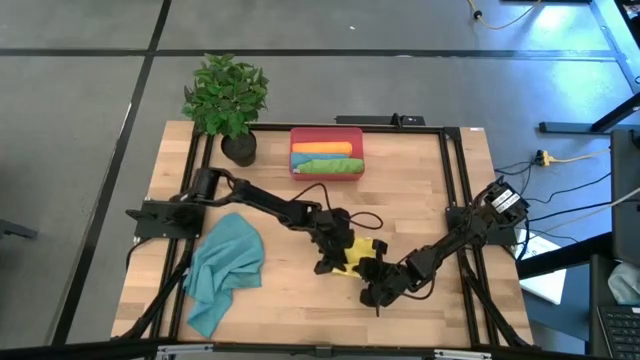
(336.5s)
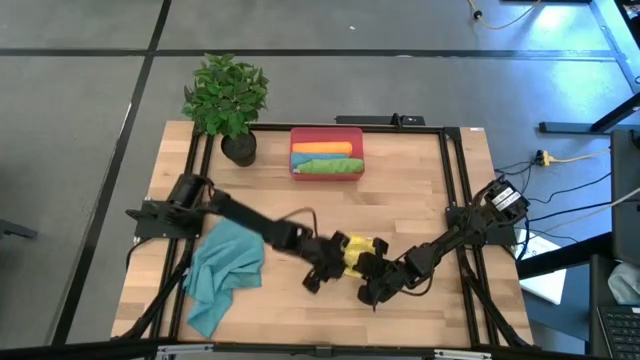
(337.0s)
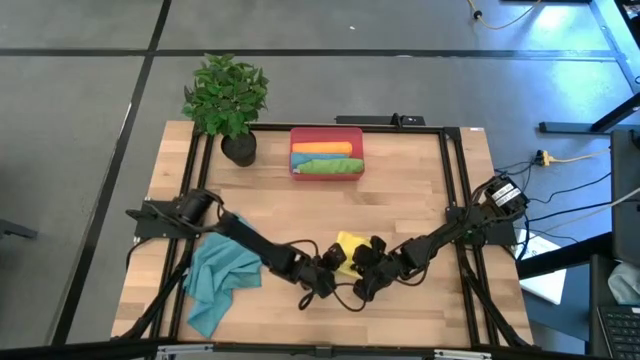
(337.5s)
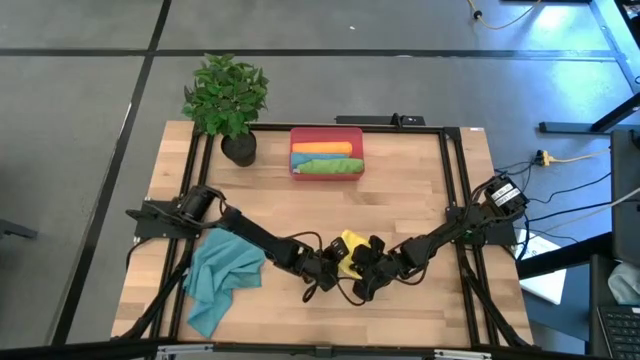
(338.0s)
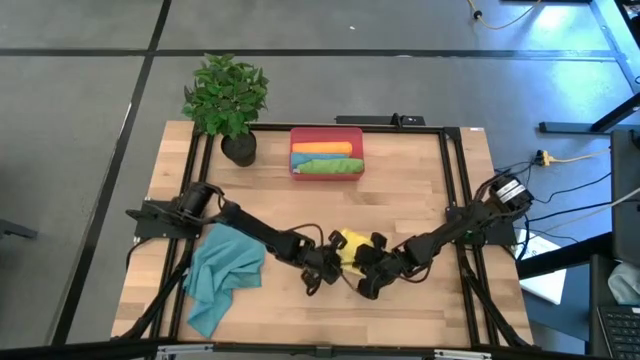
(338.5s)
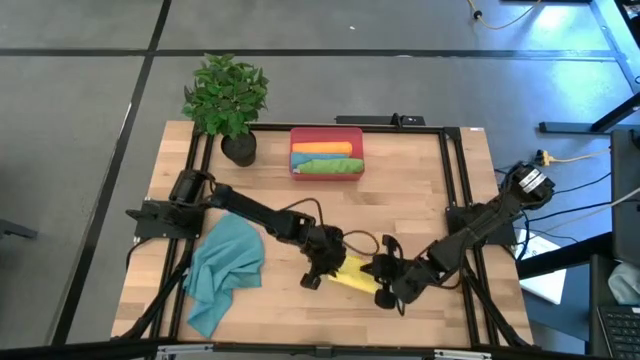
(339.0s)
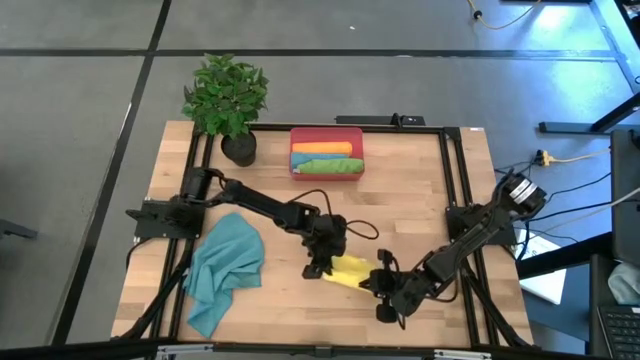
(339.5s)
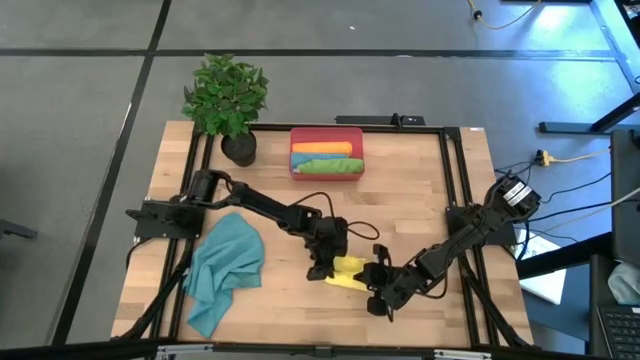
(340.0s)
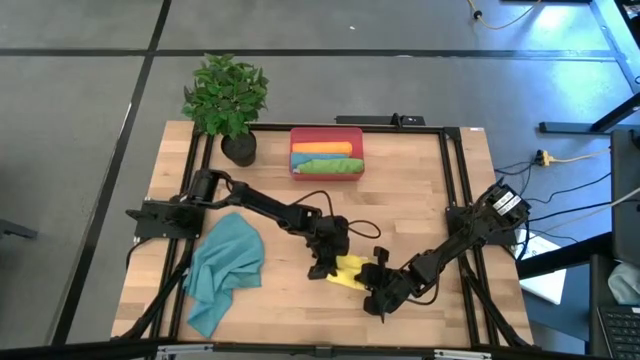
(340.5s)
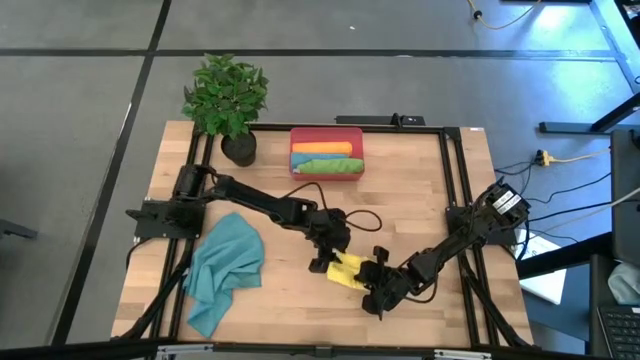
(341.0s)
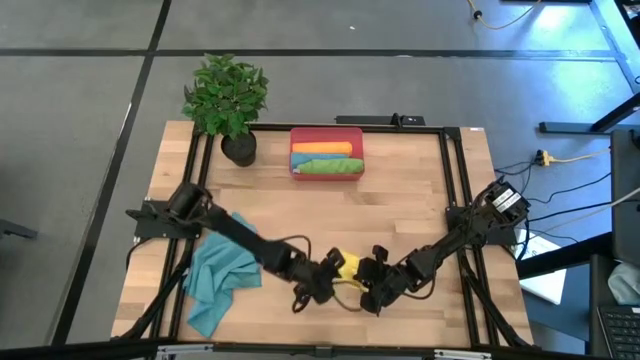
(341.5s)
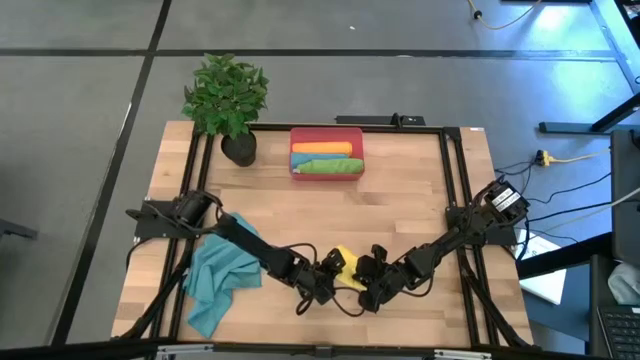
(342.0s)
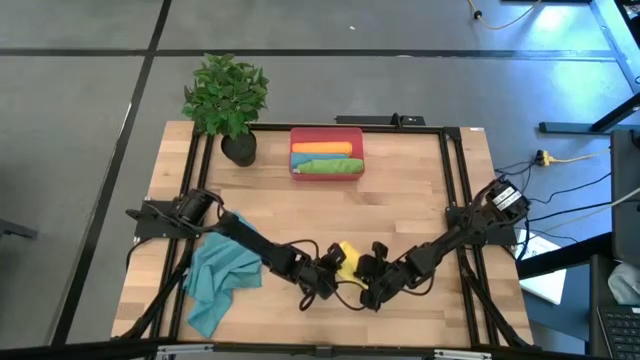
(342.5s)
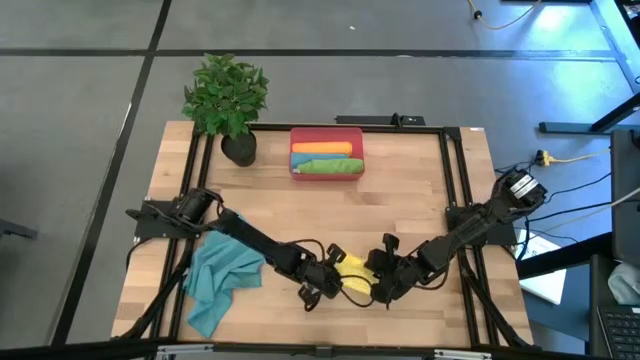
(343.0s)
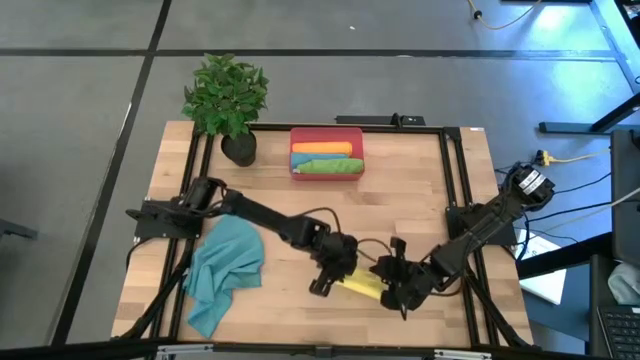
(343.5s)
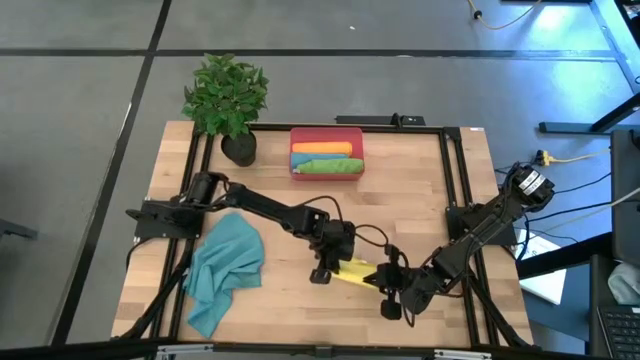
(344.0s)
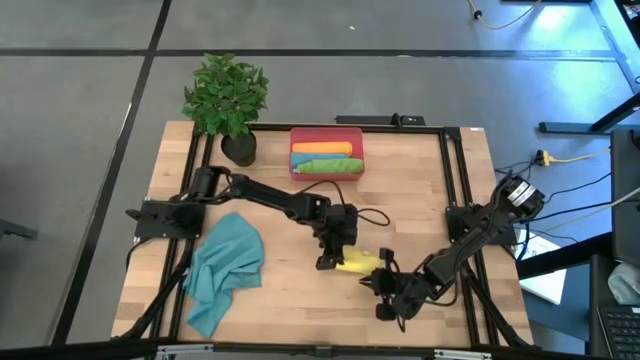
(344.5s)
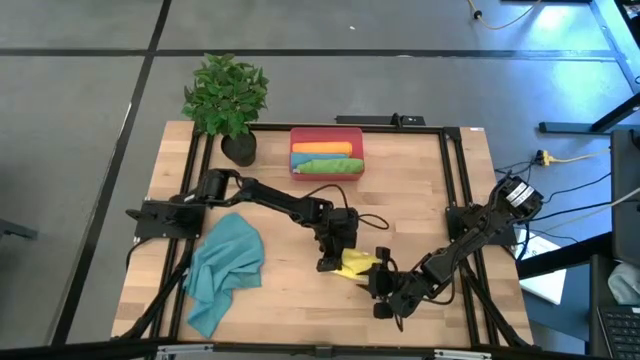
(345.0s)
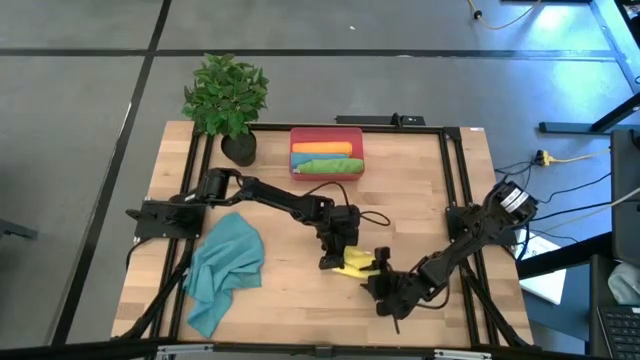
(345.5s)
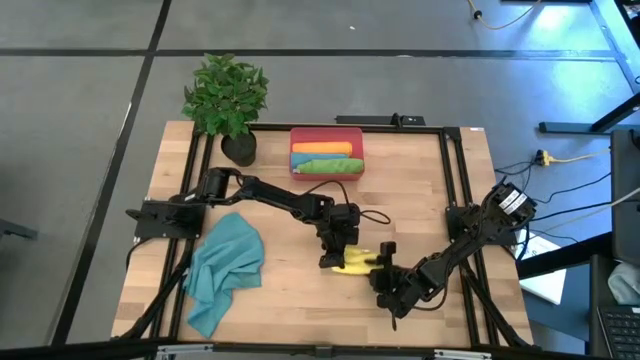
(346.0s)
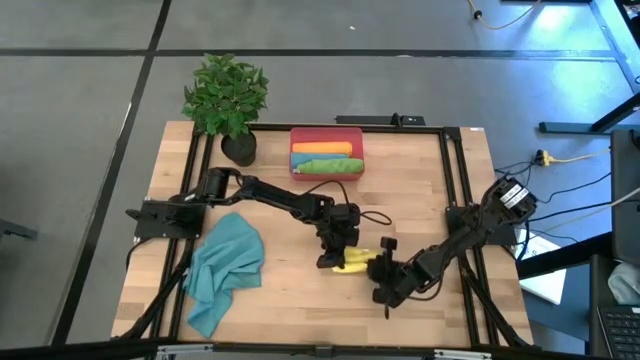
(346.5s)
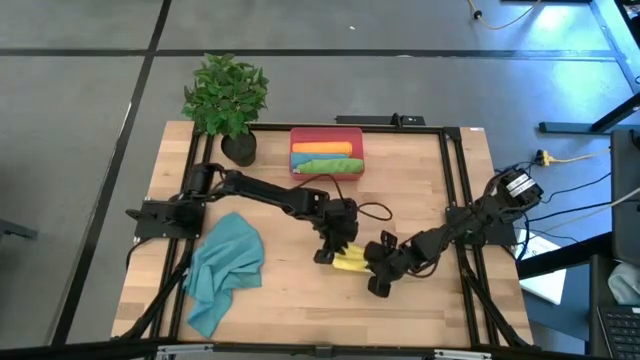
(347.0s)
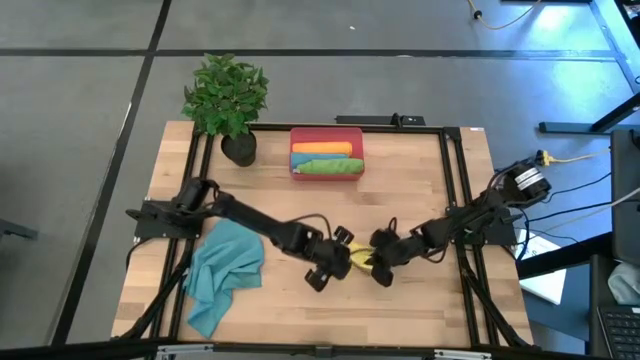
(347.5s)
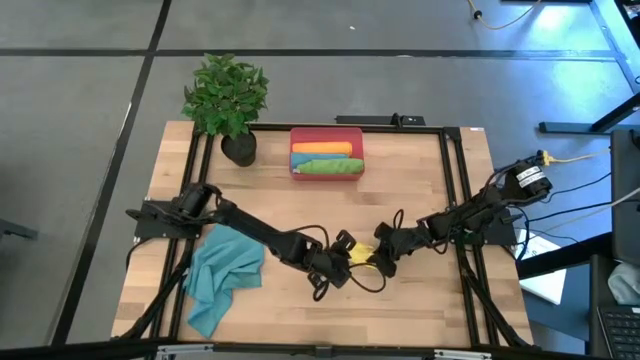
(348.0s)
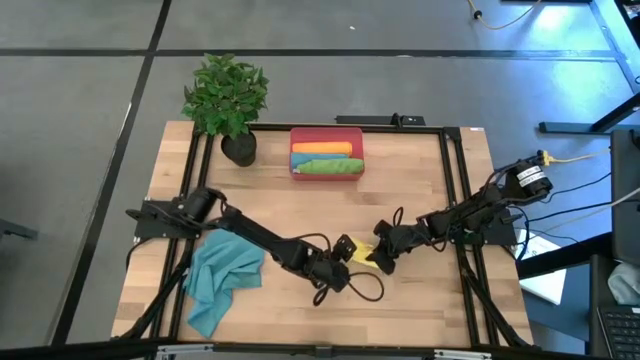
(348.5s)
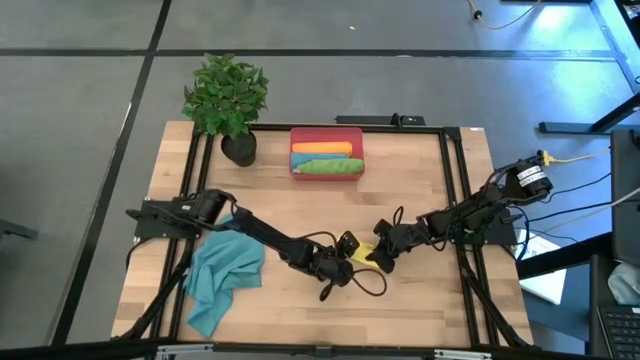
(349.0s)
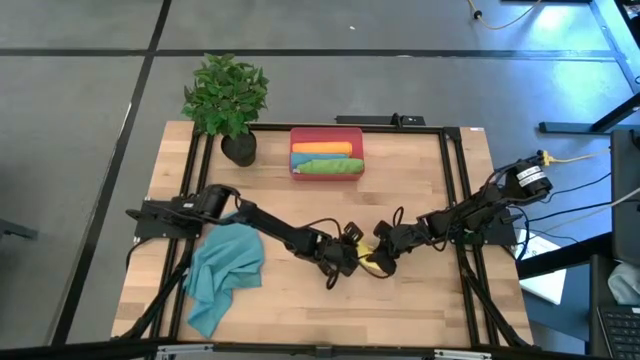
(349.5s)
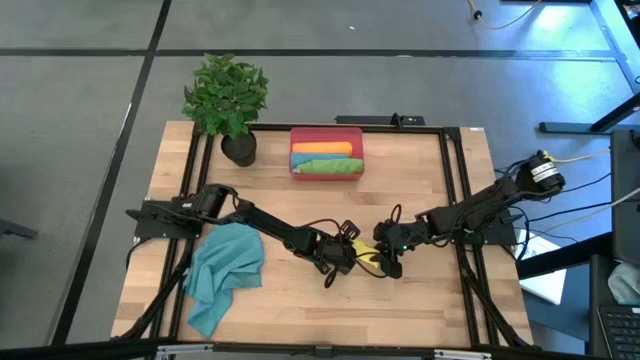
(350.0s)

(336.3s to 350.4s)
Task: Roll microfiber towels into tight, uniform cylinder then place into a basket
Roll the yellow towel

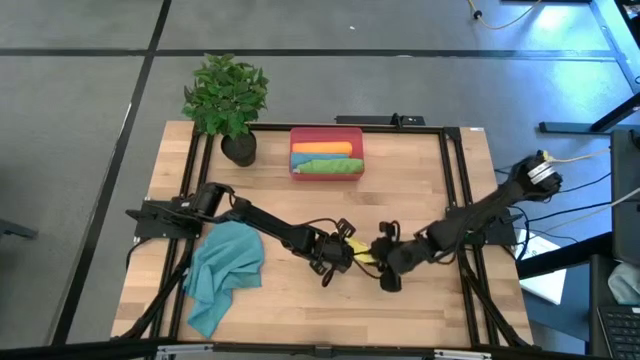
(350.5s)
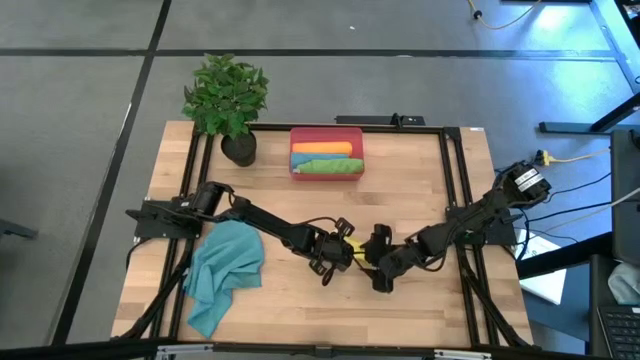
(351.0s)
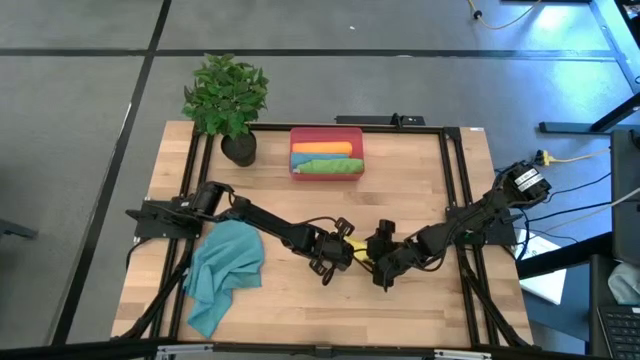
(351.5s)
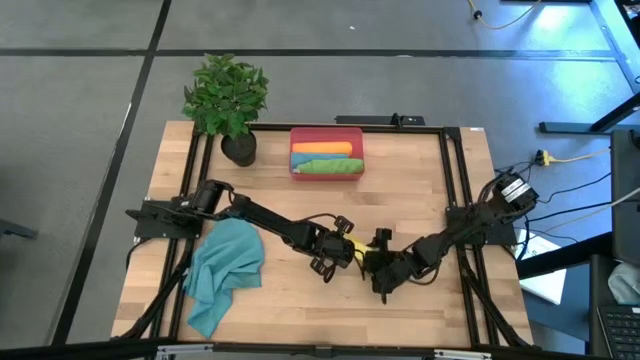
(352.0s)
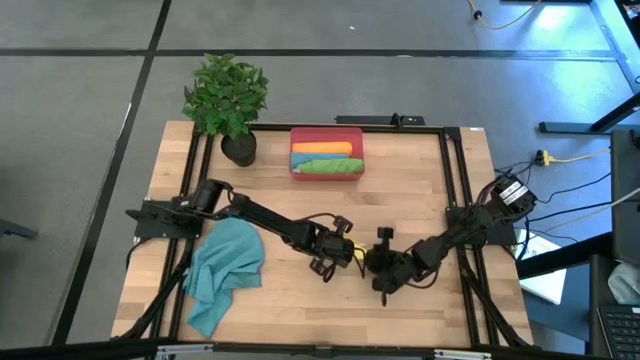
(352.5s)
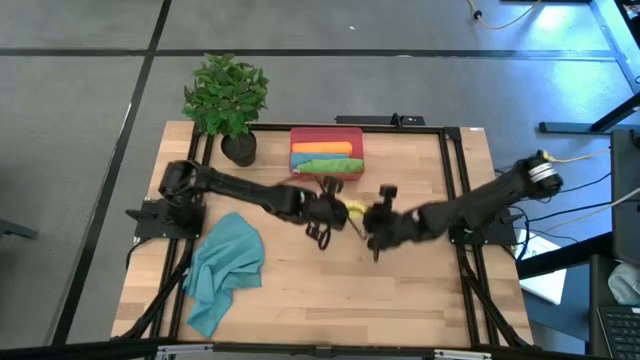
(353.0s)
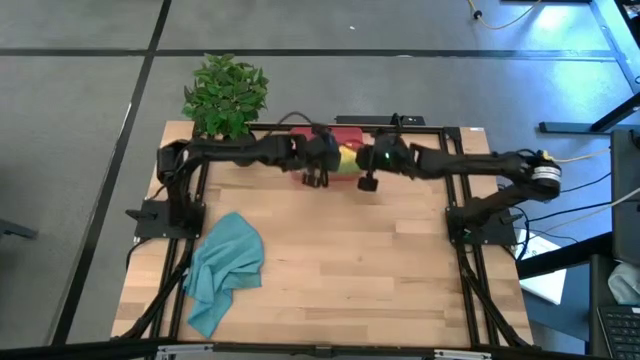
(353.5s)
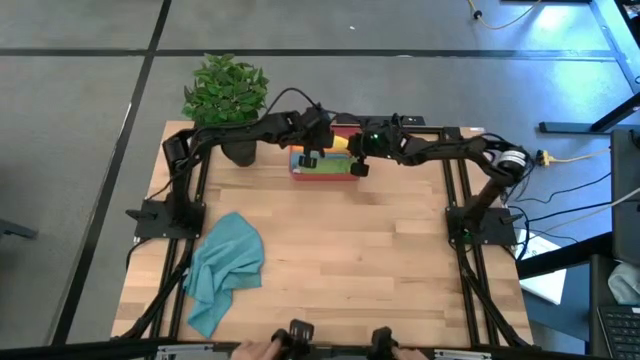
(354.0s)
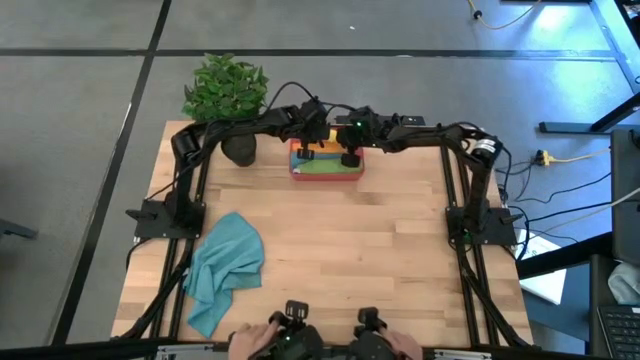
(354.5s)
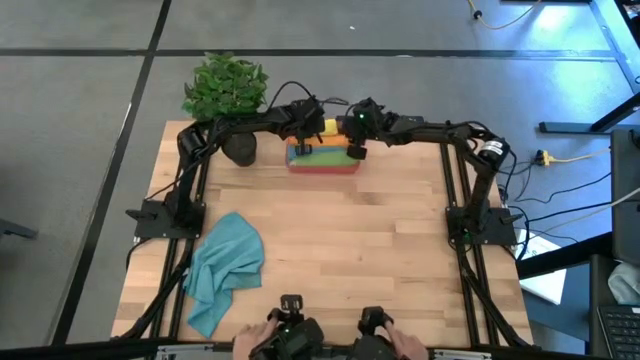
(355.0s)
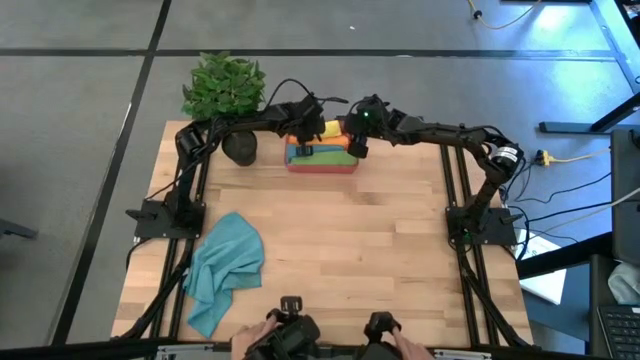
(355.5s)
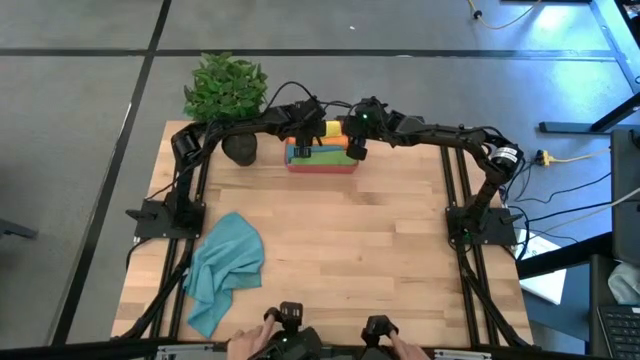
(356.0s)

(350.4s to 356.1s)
Put the rolled yellow towel into the red bin

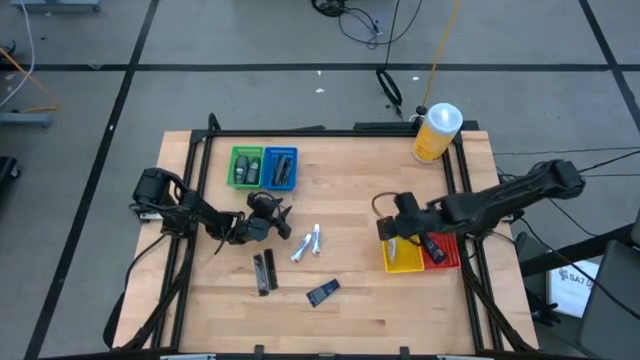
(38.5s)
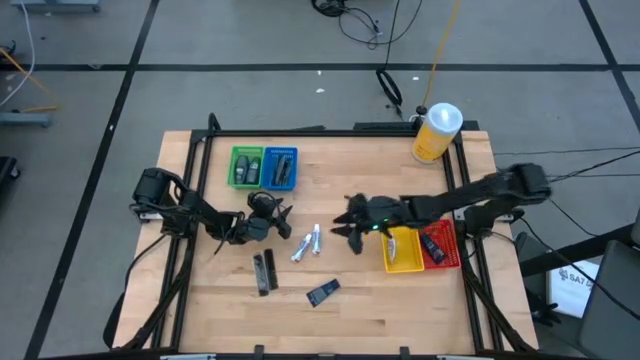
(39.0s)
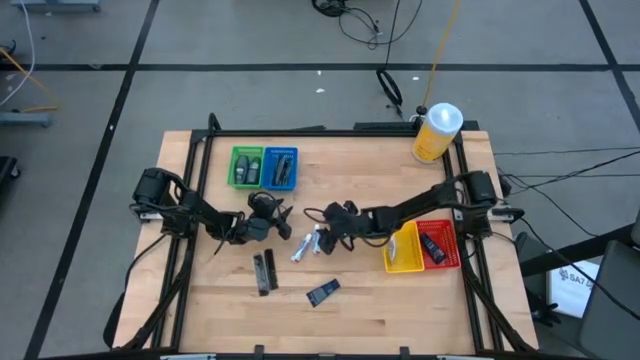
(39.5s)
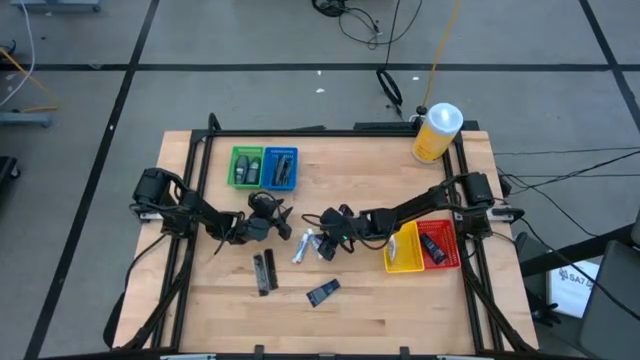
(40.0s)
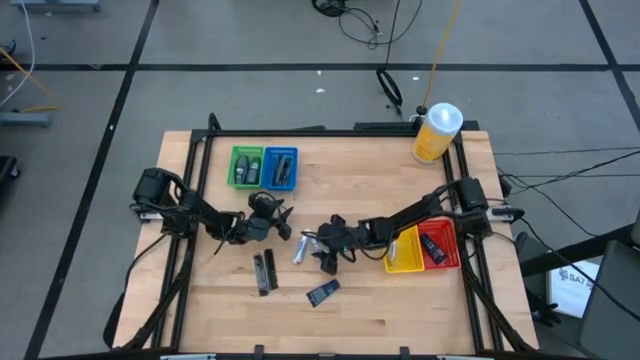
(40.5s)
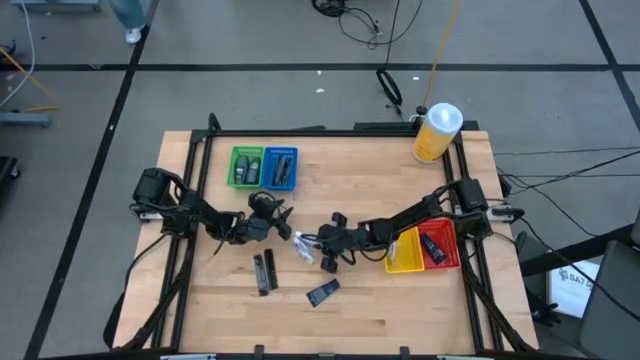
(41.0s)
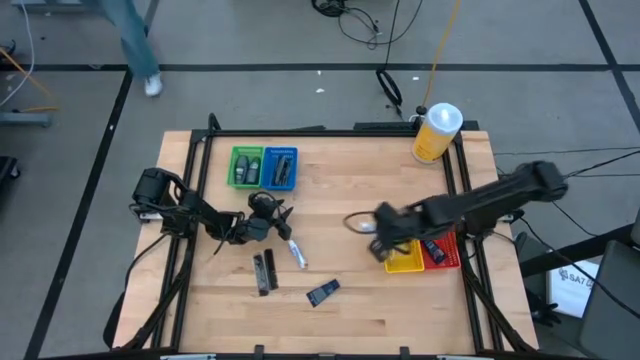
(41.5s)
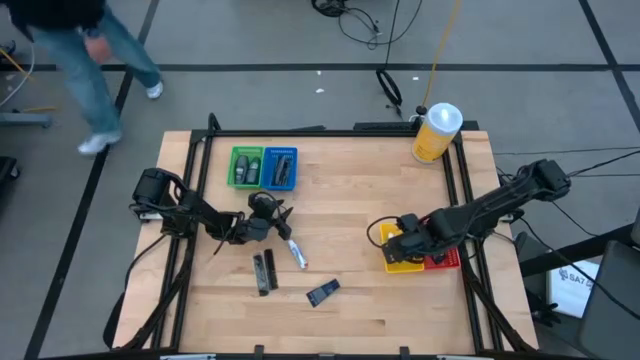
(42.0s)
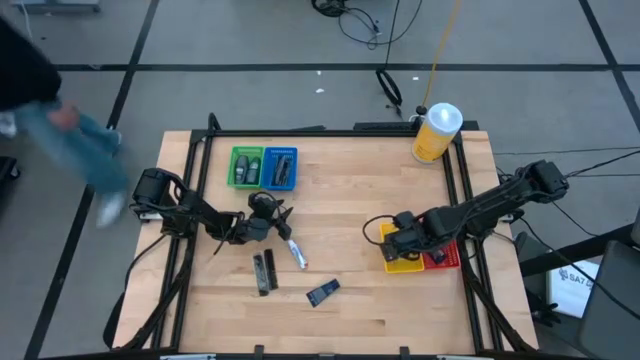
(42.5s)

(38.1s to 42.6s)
Task: Pick & Place Travel size toiletries
Put the white toothpaste into the yellow bin
